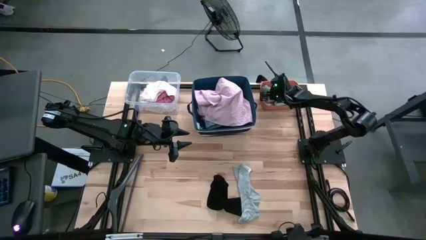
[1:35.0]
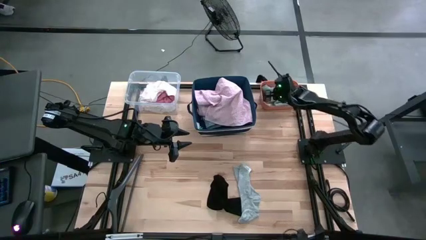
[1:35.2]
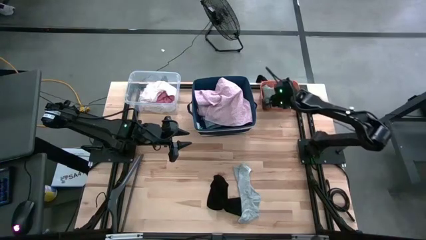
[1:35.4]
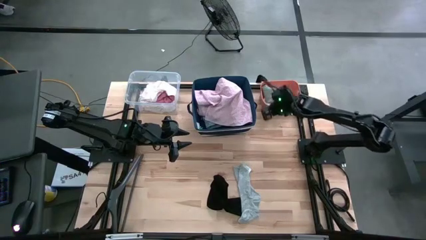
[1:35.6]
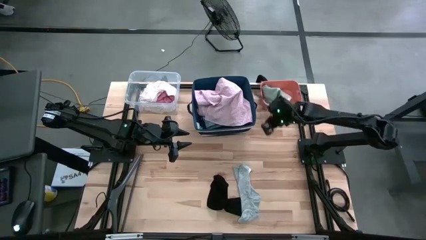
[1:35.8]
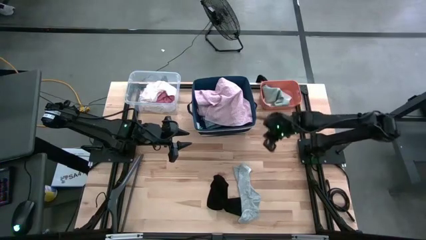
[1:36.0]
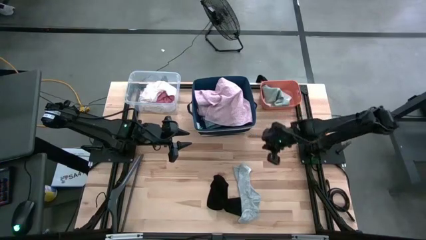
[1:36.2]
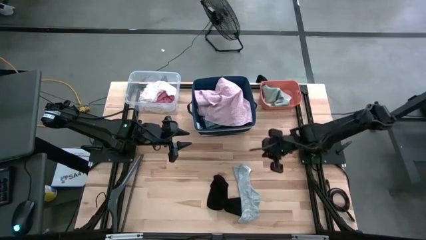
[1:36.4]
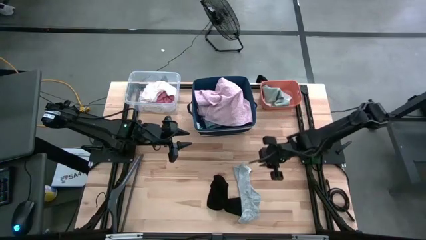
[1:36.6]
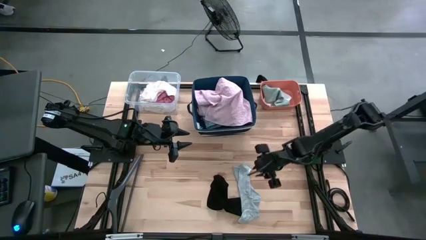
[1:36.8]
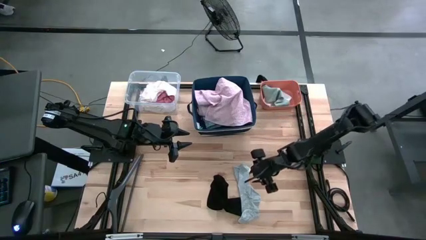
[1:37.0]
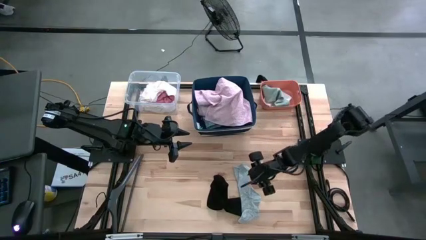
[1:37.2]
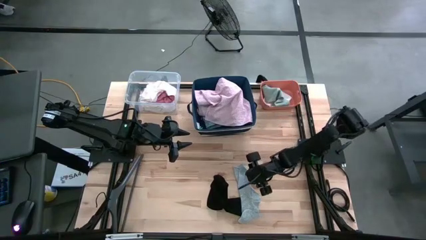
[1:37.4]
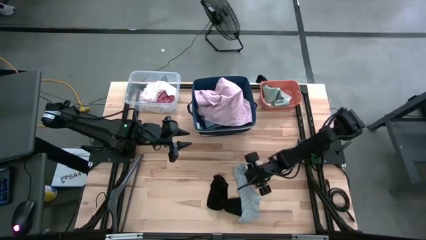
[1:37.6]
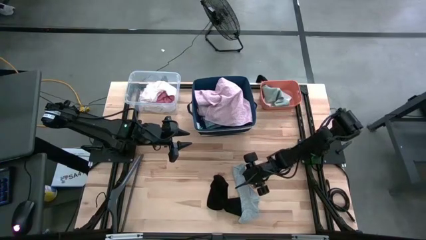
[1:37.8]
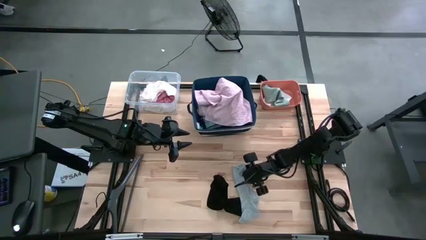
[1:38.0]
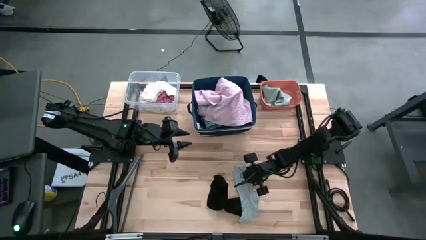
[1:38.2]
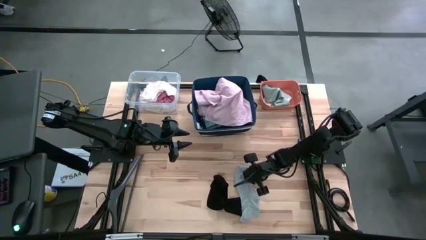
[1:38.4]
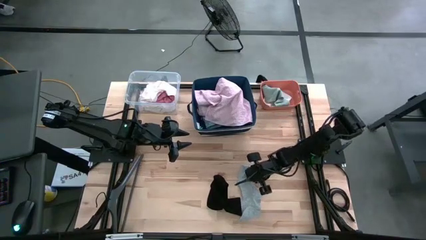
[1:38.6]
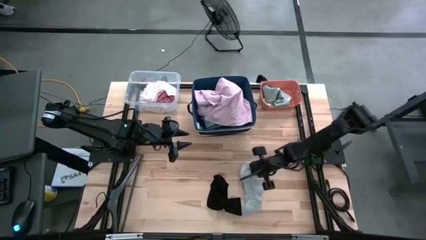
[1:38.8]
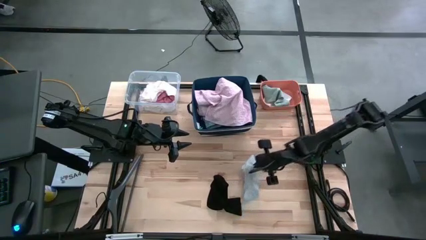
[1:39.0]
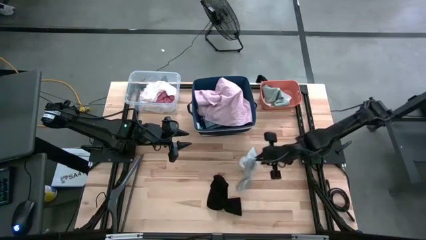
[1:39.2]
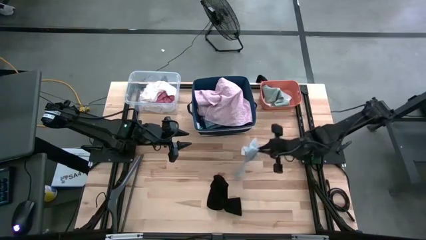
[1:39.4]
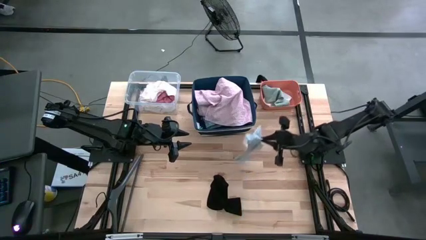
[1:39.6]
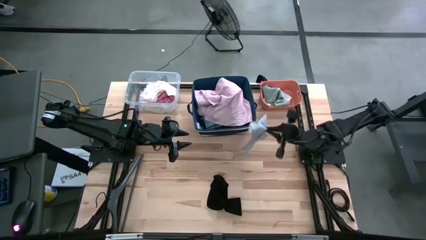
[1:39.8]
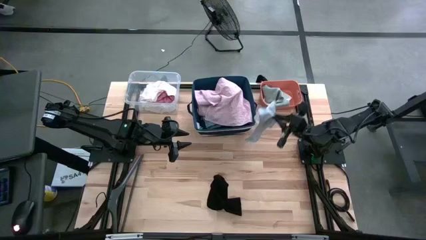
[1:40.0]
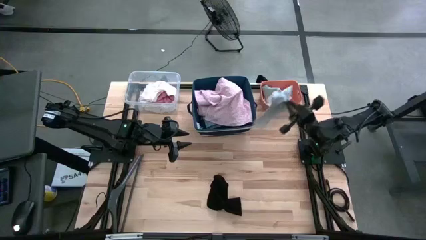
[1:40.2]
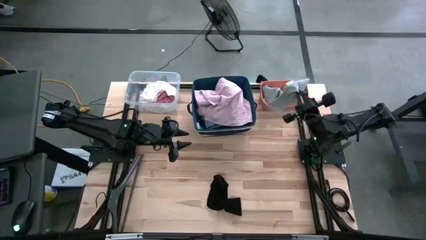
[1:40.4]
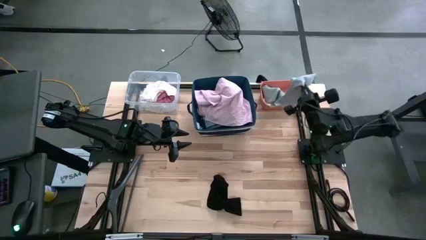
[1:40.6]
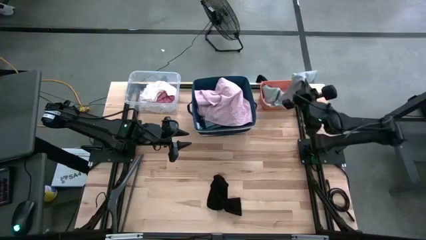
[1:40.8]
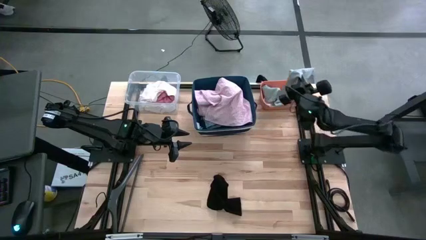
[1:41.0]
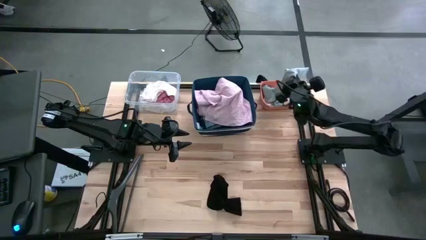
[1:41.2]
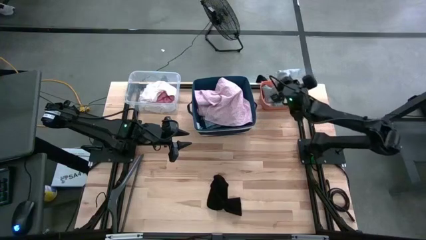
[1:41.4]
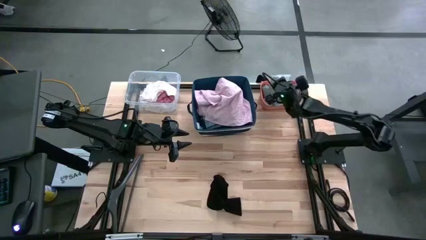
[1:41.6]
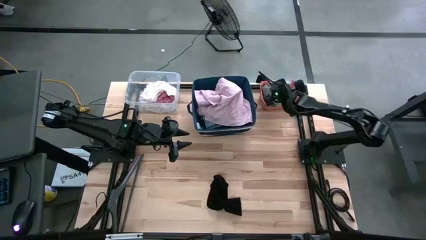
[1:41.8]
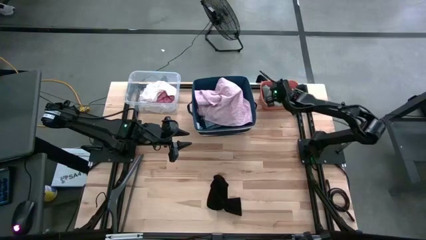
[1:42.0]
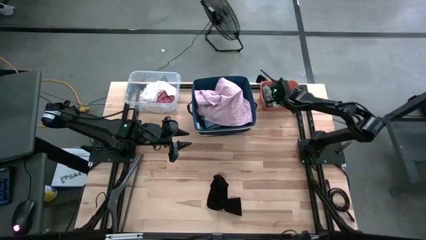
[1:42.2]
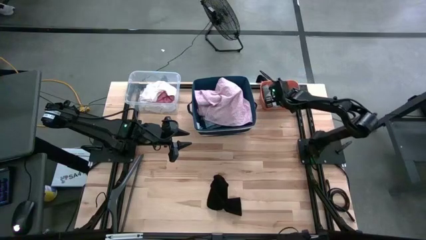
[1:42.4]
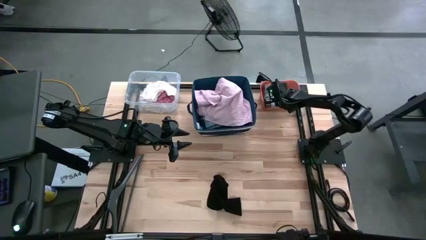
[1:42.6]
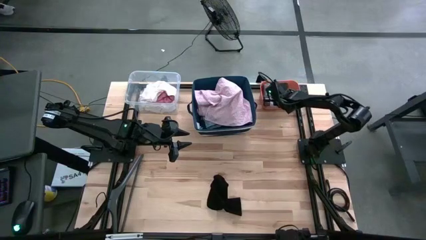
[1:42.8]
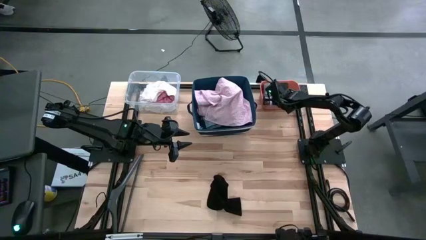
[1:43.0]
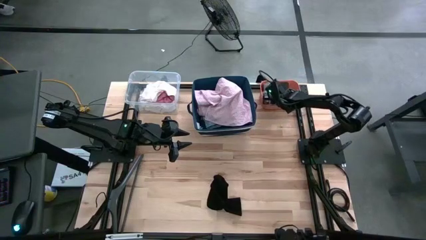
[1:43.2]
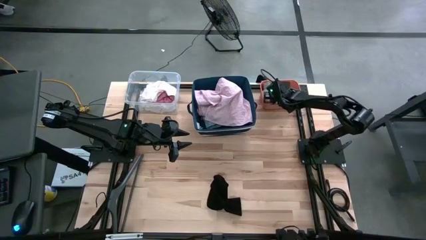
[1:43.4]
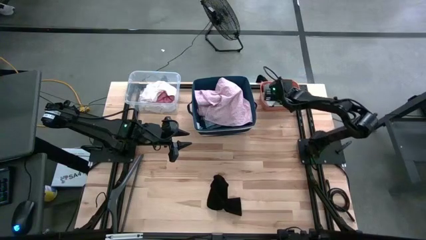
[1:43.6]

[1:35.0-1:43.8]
Task: Pick & Place Cloths
Put the gray sock into the orange bin

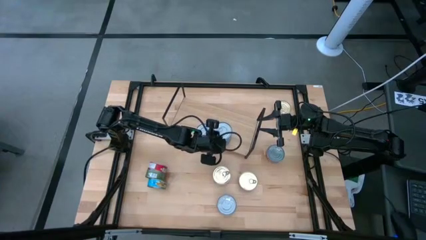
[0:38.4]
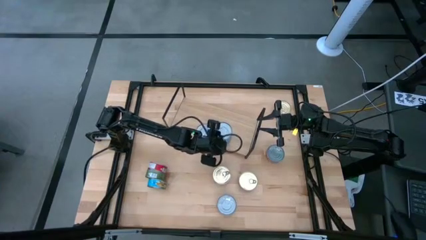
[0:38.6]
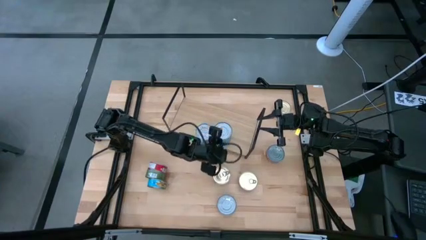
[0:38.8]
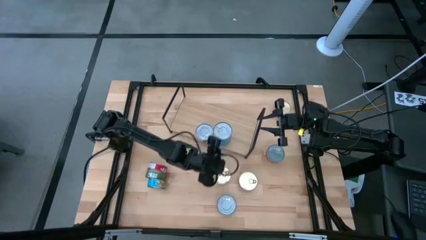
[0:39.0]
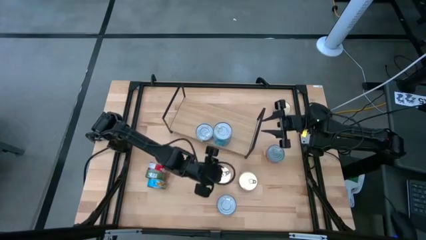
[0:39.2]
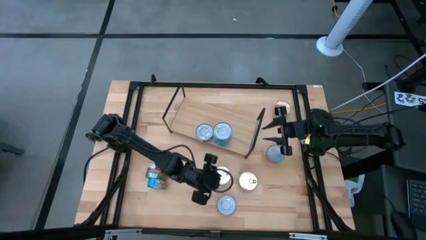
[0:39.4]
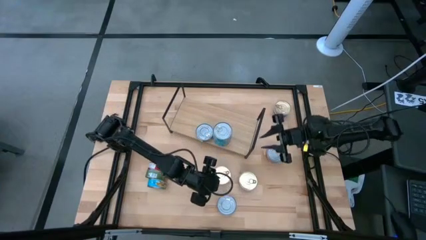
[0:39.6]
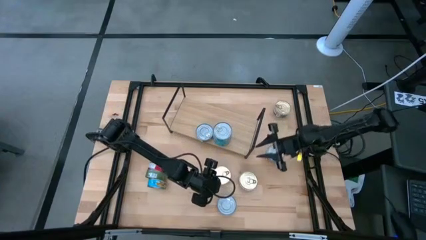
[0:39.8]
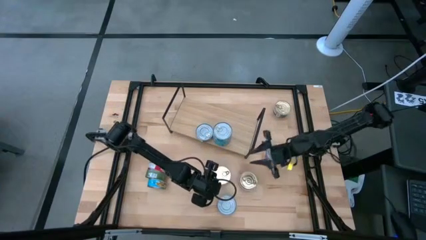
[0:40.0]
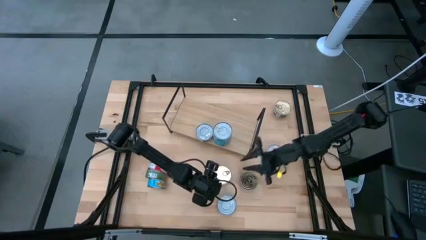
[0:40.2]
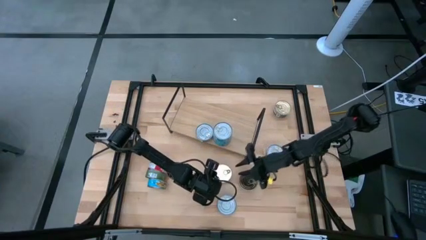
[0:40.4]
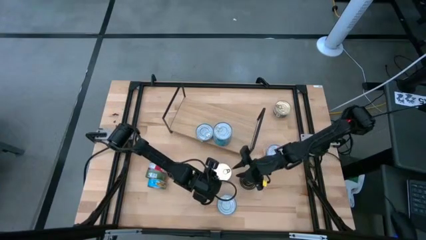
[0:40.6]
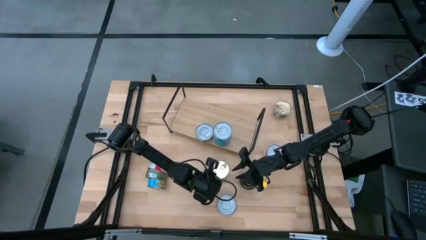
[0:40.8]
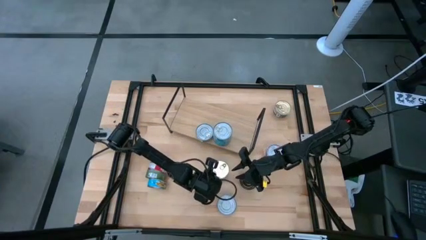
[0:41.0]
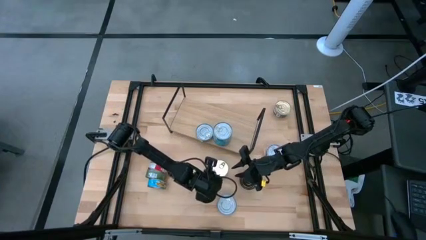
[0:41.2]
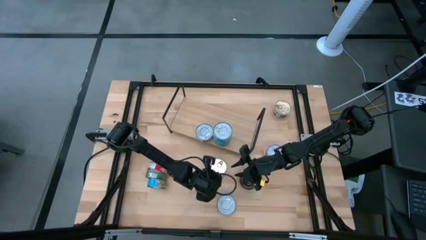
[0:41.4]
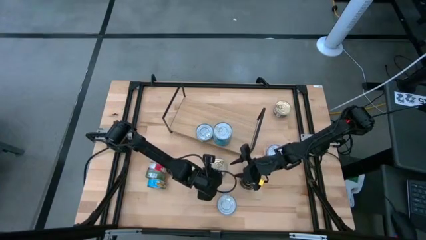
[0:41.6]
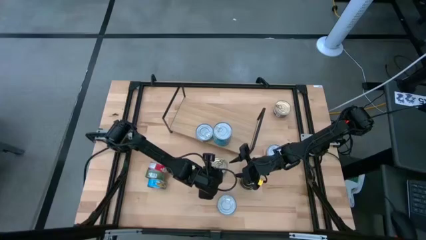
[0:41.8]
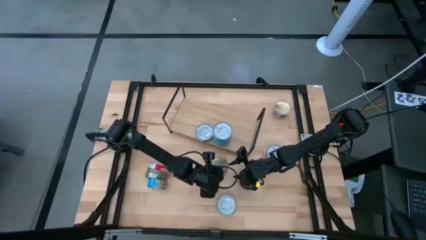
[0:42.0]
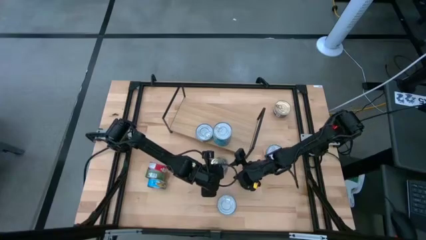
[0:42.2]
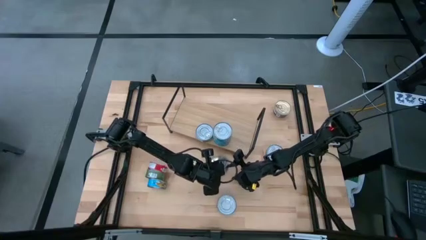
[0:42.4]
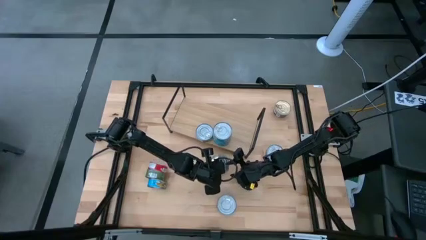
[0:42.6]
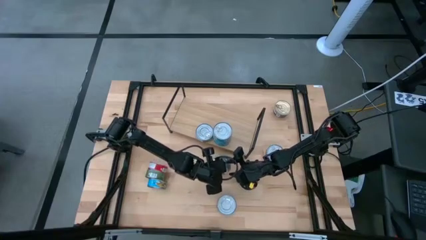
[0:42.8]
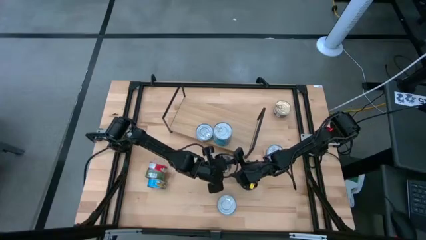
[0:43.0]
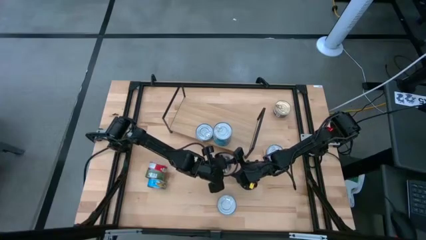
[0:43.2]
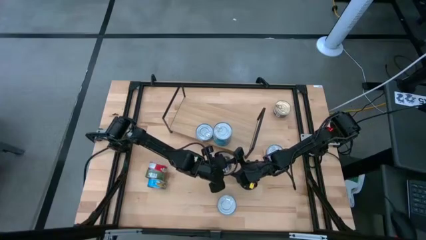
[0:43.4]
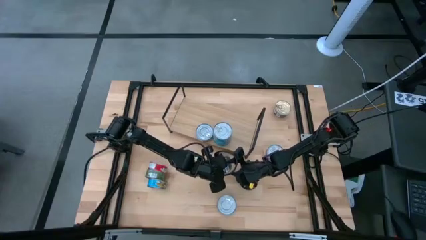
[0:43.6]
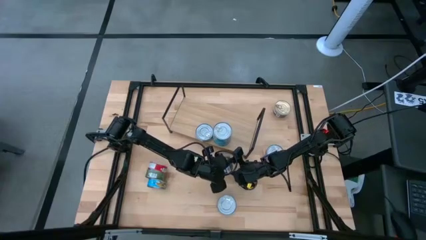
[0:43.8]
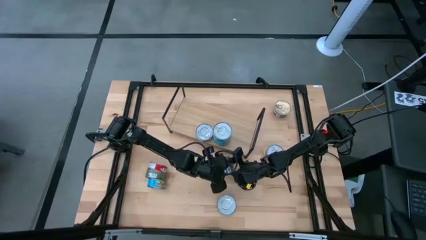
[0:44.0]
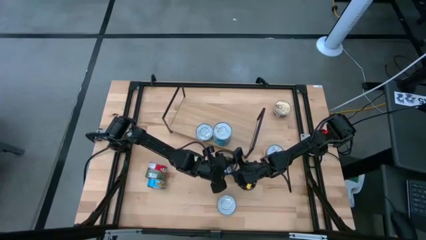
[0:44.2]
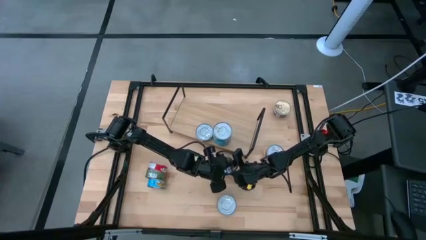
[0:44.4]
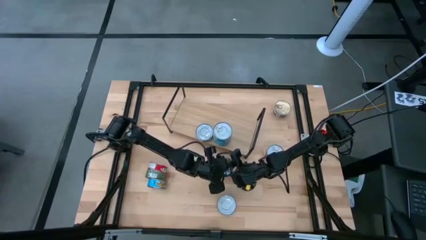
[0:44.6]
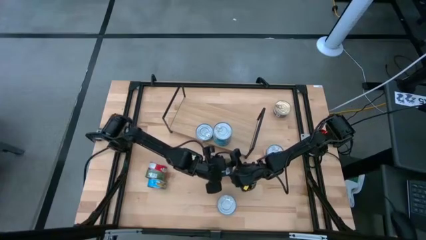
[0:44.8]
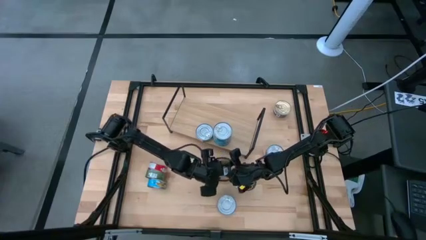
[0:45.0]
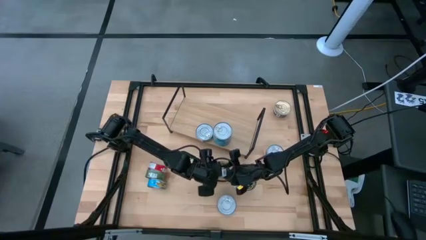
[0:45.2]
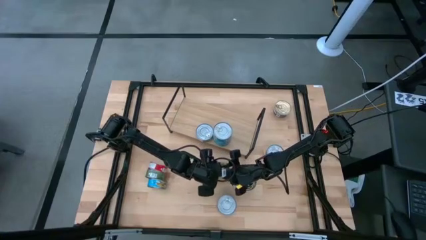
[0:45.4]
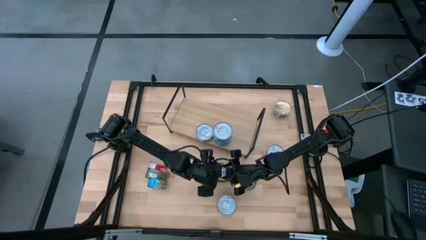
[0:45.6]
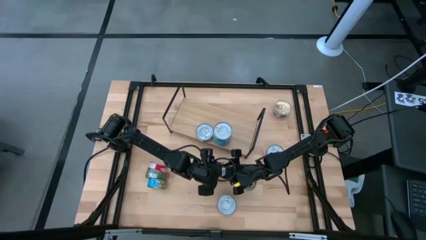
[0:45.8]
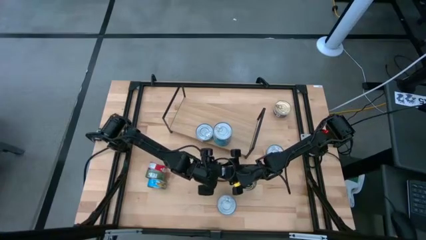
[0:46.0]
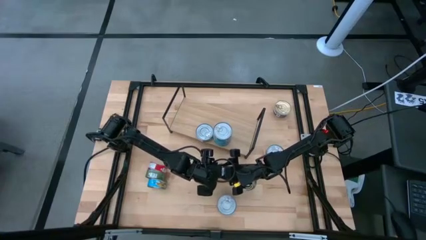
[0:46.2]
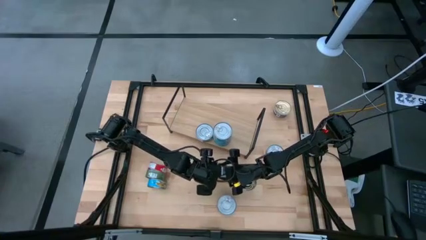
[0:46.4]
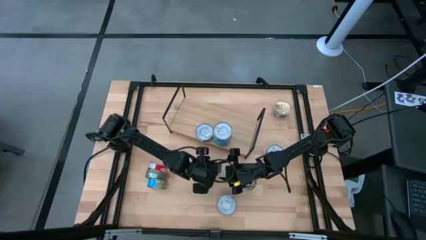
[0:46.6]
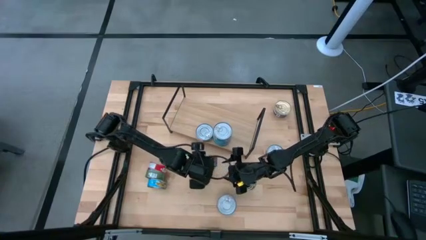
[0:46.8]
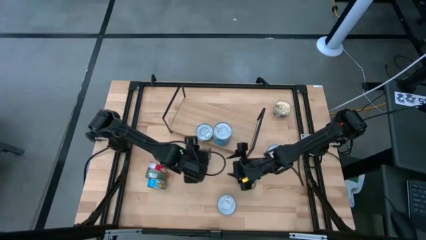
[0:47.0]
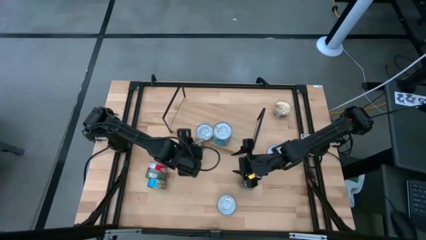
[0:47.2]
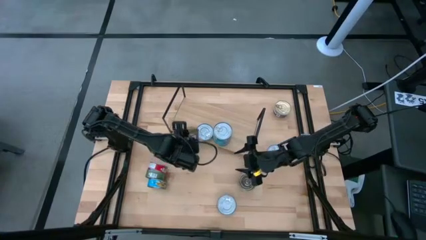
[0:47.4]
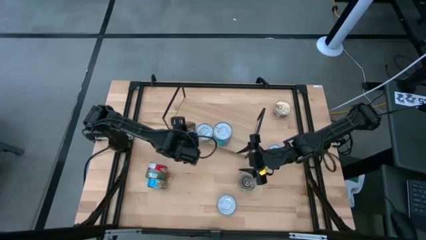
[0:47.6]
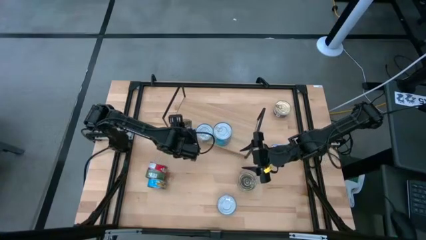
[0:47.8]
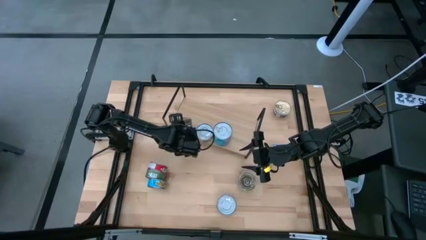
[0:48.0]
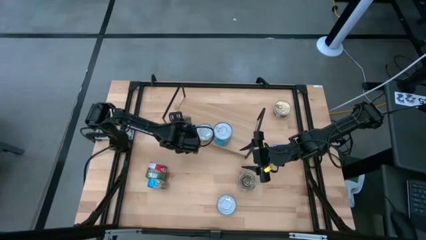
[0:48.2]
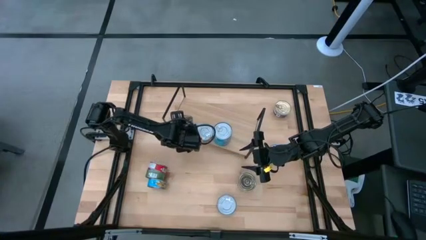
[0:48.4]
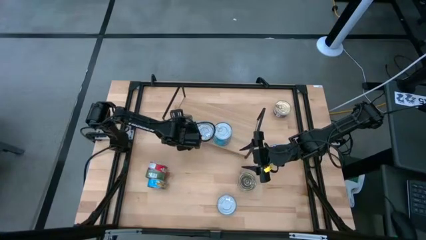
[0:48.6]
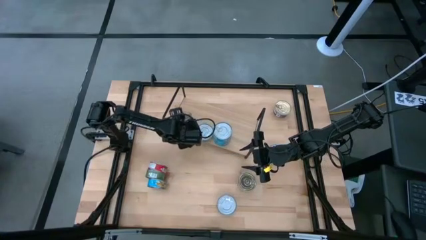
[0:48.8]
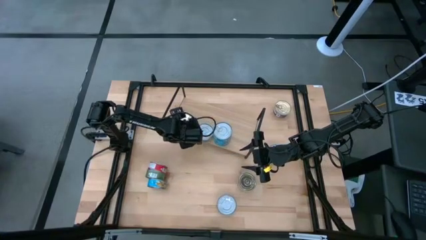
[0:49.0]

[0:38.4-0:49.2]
Task: Stack canned seafood by type on shelf
Put the blue-pink tuna can on the shelf
